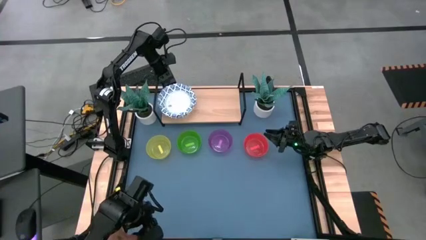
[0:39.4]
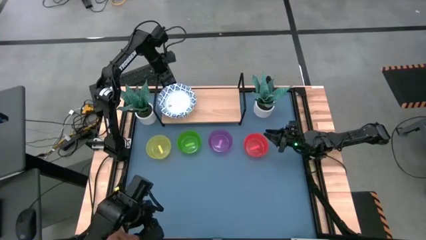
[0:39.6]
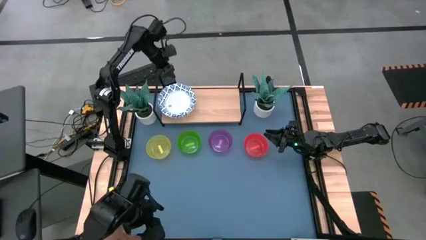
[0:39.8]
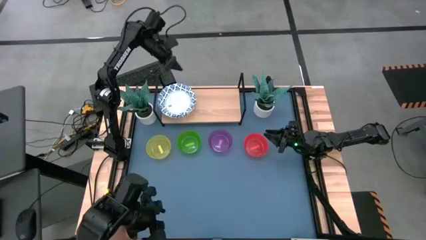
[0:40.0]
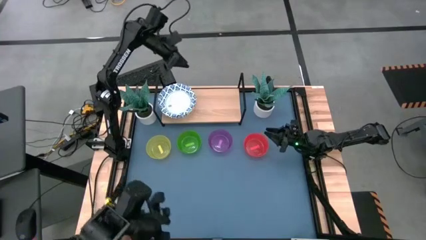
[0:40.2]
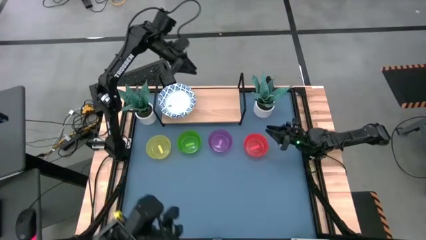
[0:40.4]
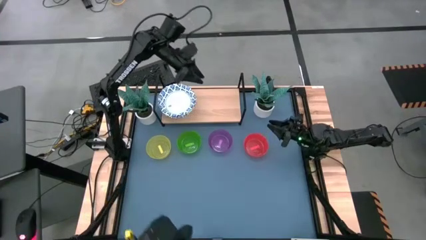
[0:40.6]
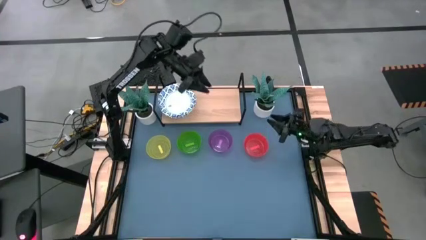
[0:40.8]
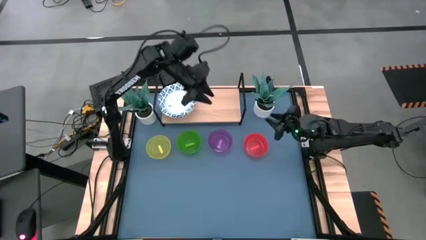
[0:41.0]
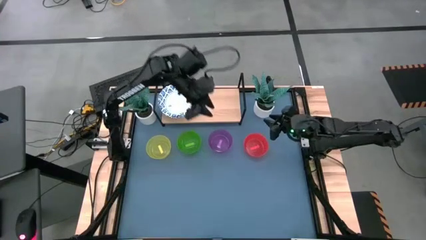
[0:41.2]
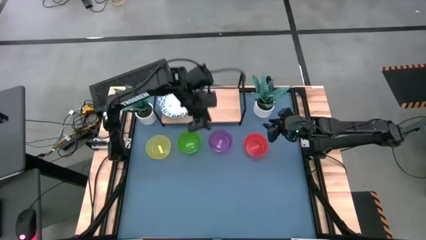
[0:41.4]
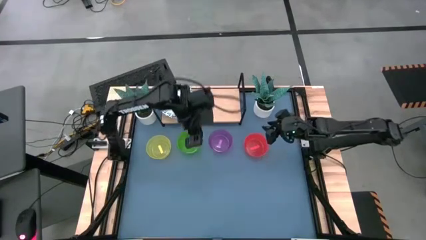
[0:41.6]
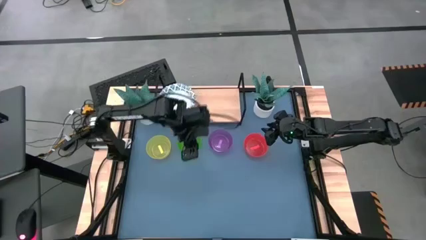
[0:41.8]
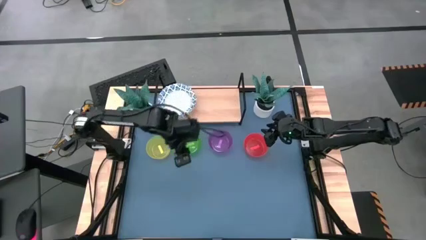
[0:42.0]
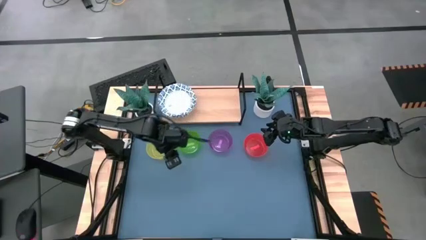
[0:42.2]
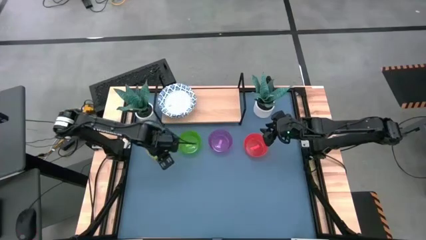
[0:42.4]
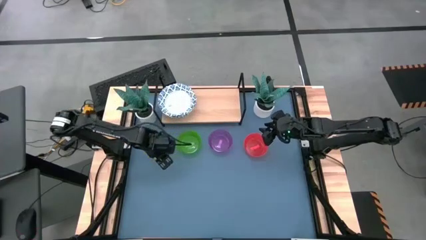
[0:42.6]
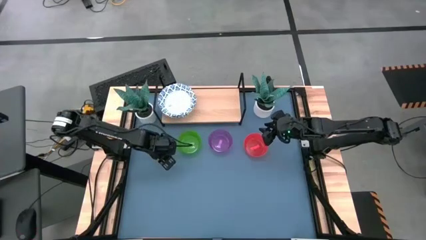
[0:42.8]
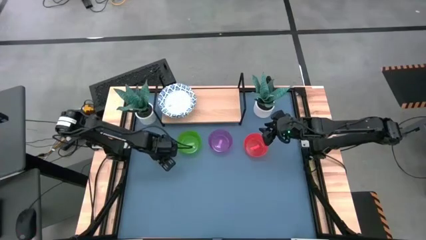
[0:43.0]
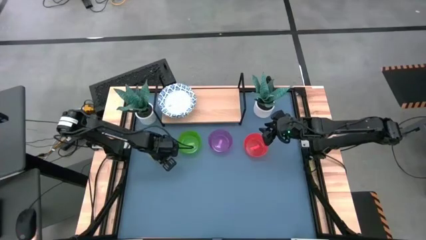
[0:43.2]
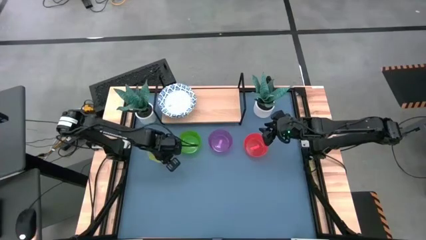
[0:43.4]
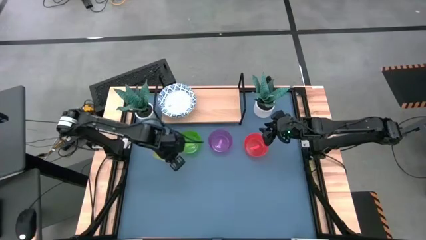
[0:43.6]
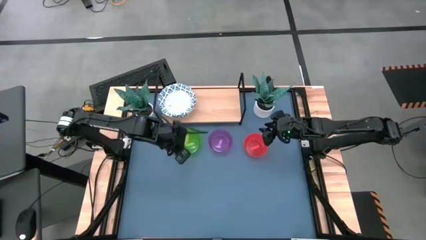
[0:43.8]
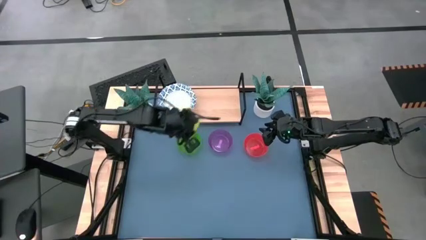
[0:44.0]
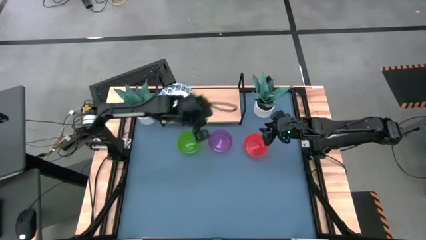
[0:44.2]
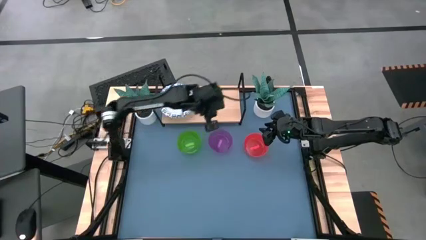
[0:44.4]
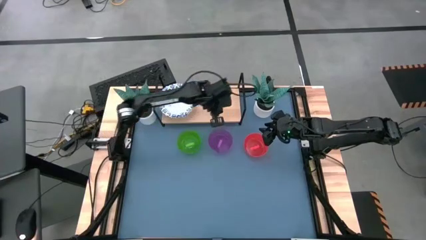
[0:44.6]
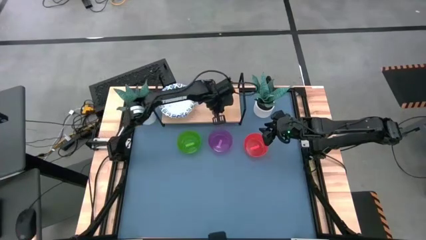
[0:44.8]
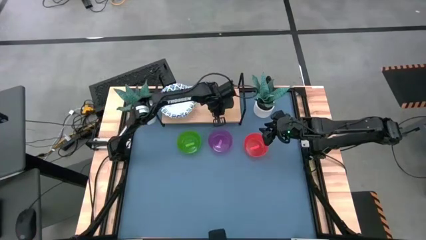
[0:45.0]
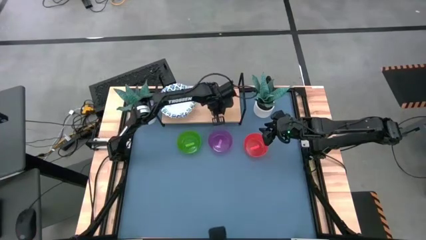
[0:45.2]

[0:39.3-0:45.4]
Task: Place and stack bowls onto a shelf
Put the yellow bowl on the shelf

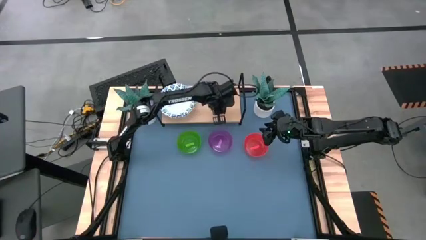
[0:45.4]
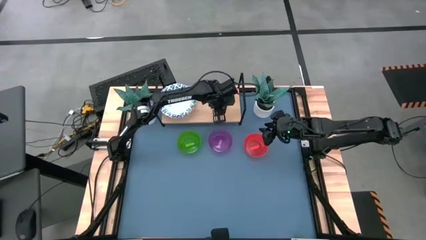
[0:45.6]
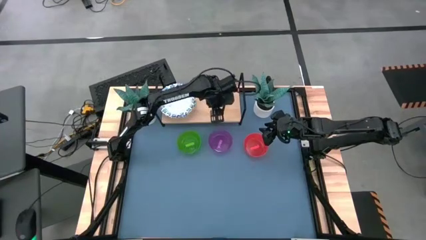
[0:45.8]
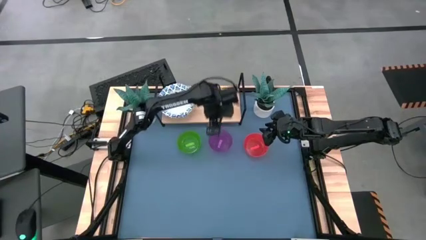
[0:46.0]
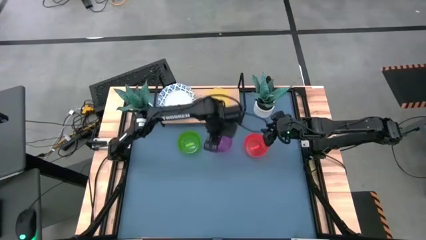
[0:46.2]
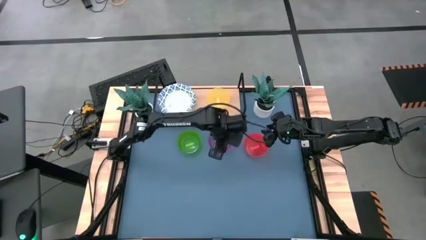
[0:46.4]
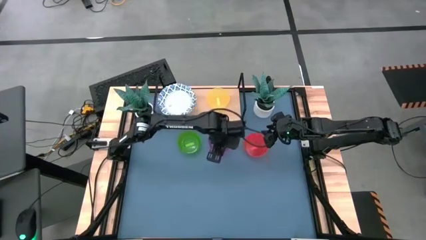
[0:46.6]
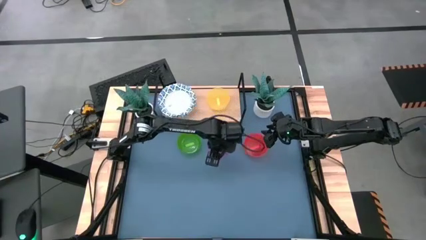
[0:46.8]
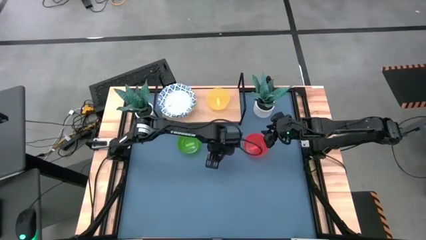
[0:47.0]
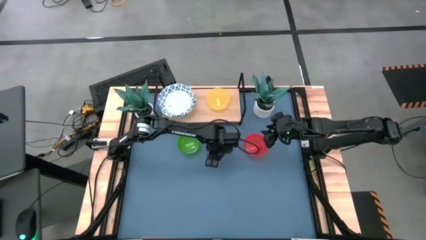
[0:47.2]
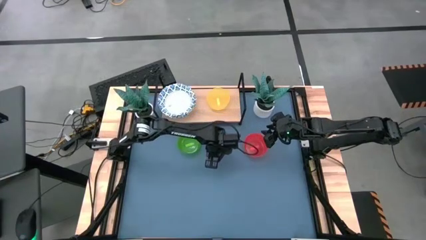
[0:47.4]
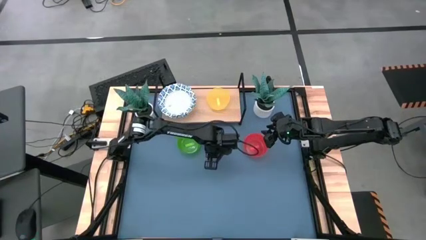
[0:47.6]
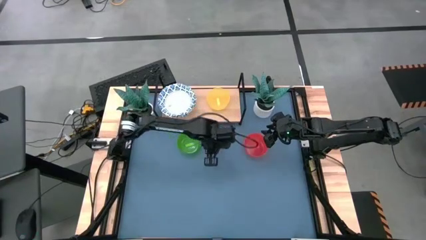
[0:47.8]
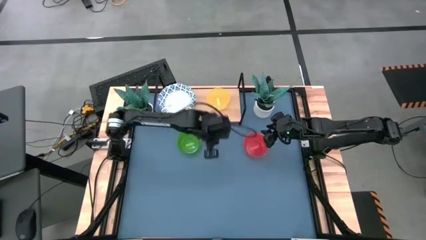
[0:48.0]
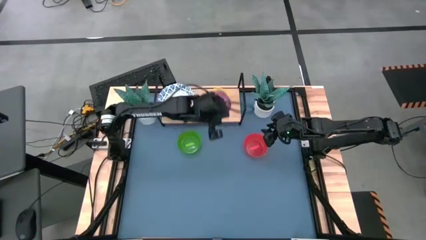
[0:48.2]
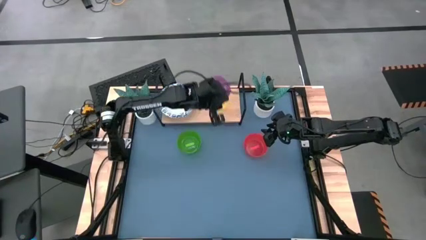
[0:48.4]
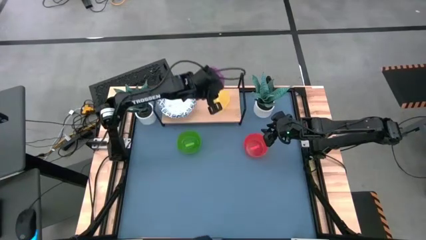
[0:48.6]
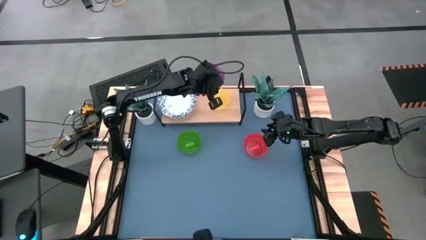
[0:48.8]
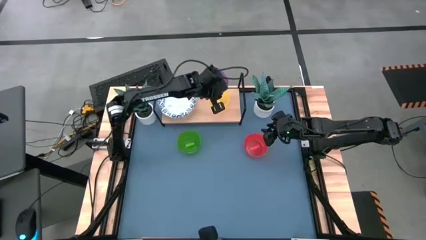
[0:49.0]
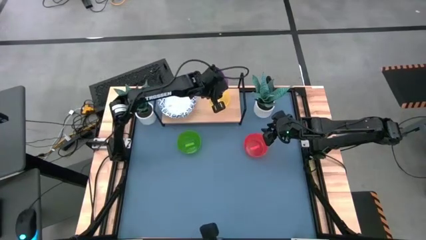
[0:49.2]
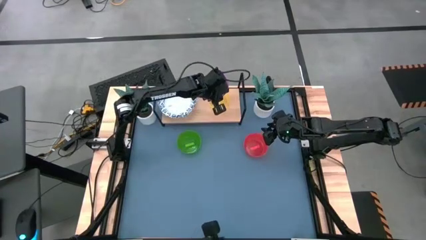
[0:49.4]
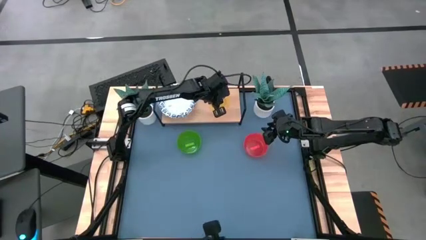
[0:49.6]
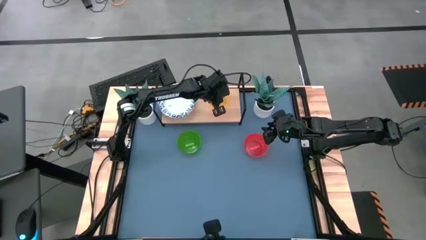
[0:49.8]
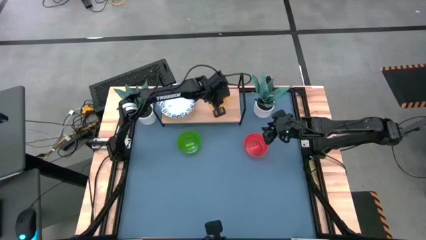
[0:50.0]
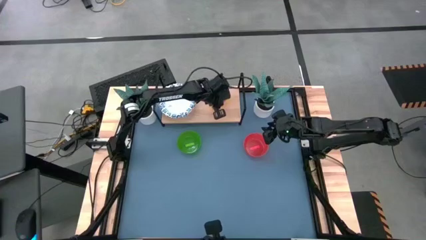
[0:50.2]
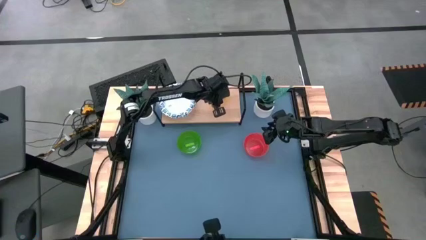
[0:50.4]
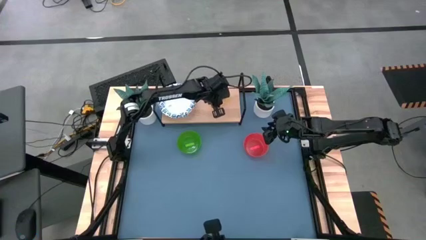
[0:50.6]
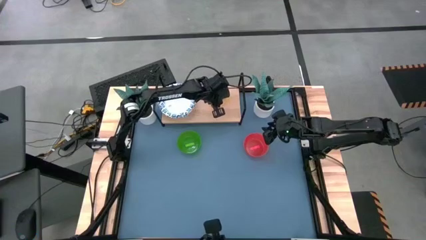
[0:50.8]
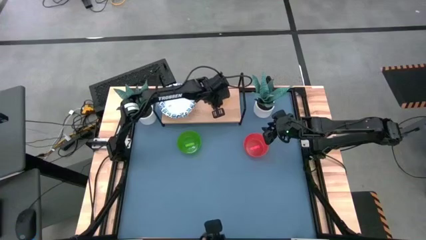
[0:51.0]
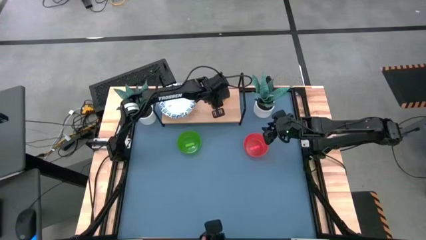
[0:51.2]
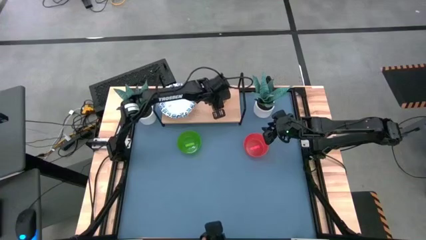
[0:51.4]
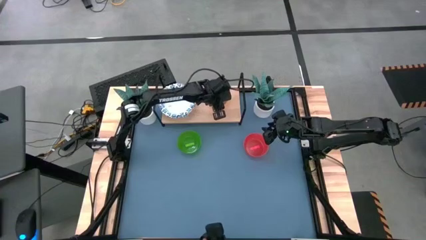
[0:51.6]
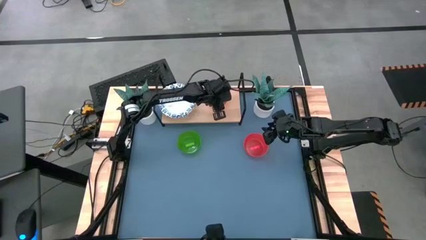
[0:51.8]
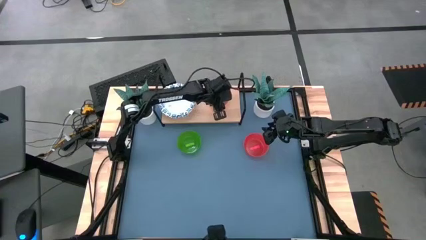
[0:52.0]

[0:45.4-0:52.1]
Stack the purple bowl on top of the yellow bowl

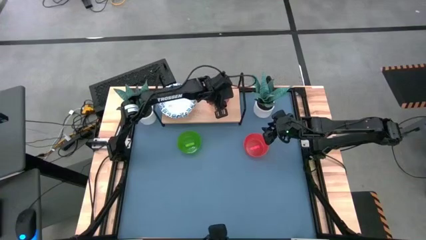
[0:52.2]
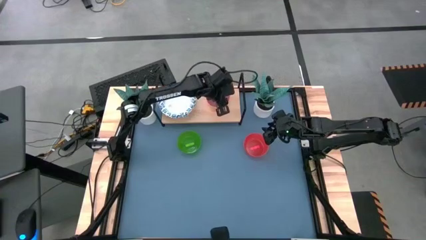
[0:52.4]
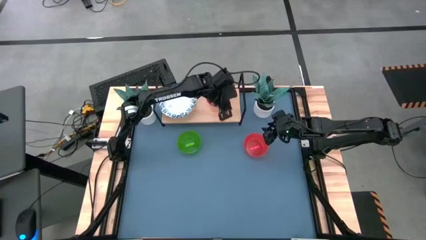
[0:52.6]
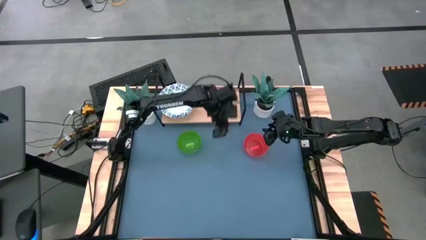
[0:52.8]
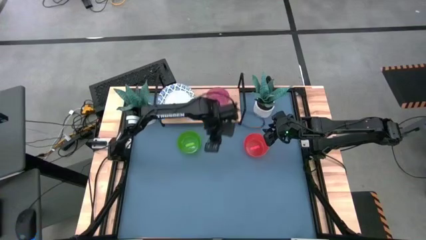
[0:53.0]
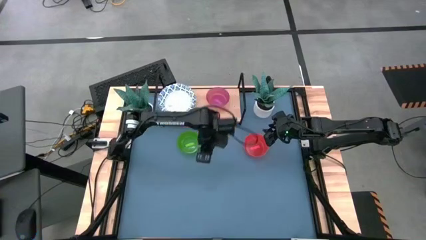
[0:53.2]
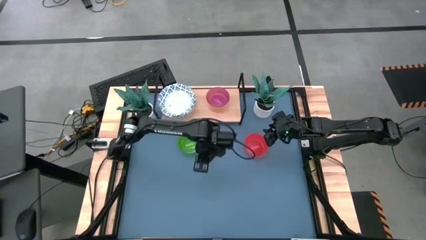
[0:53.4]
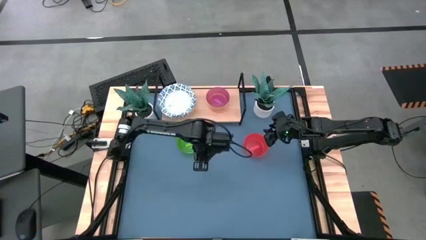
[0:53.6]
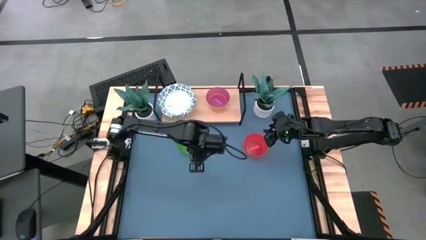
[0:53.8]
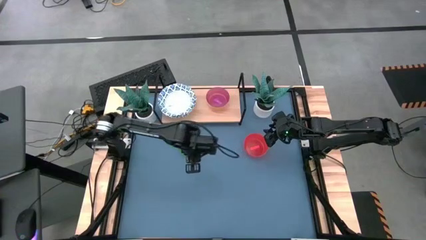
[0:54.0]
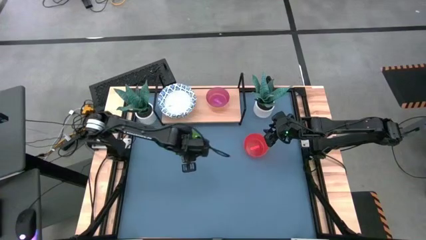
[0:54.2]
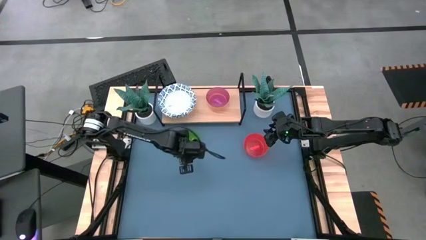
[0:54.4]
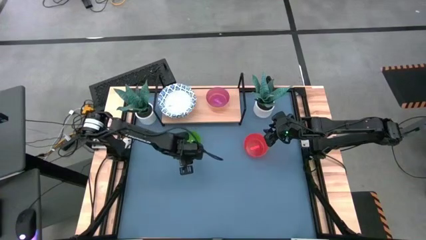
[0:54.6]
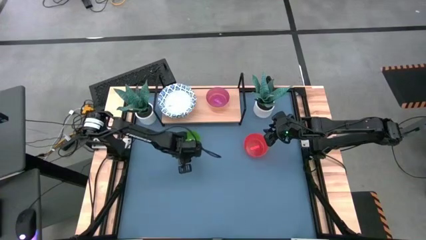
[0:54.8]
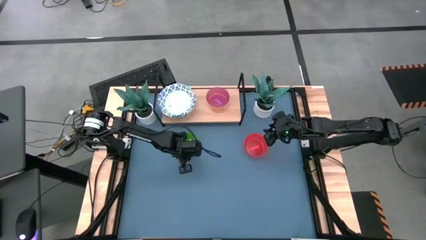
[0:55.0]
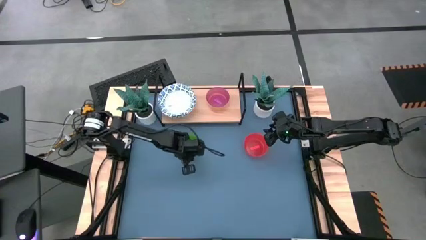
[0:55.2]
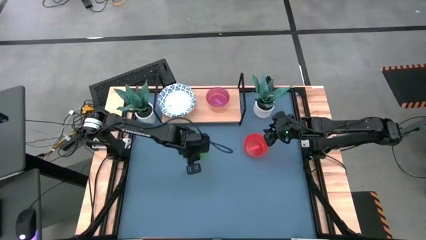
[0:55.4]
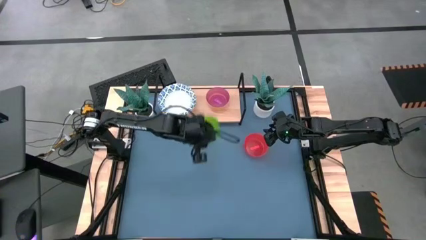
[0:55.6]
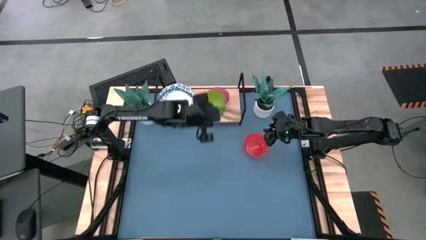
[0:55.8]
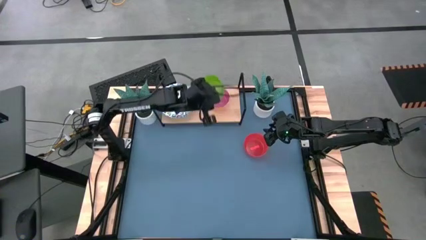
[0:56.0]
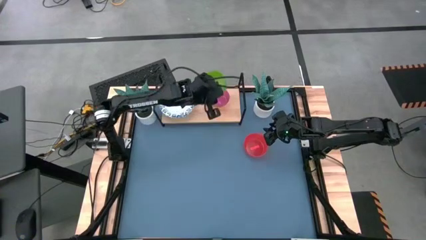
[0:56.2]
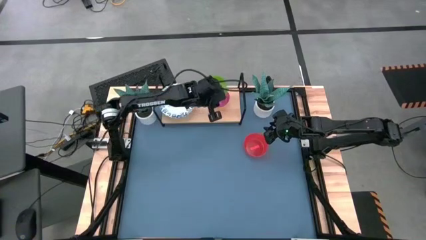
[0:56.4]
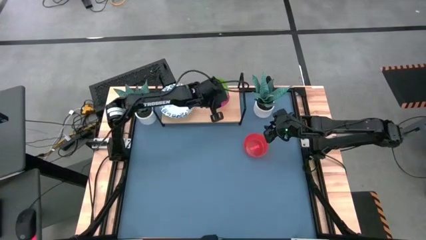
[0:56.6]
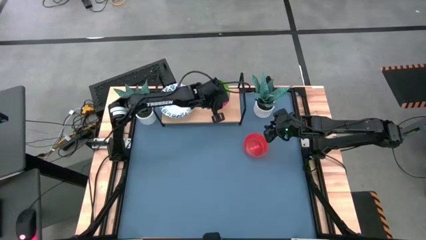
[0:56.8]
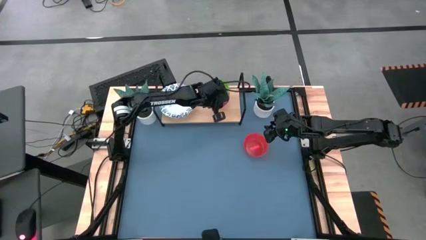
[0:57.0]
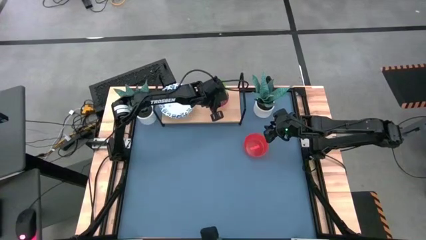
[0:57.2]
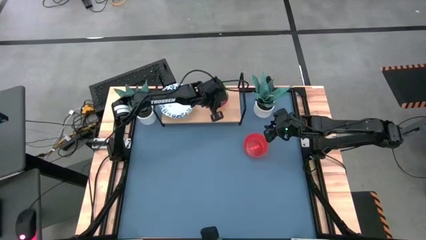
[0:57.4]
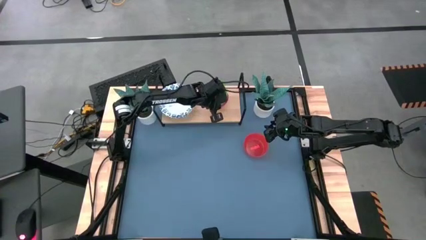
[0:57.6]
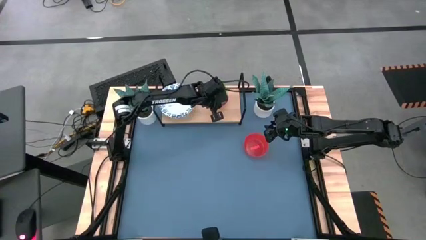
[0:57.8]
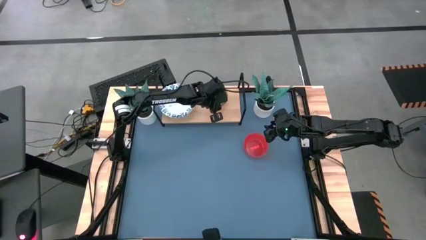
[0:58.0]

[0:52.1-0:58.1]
Stack the green bowl on top of the purple bowl
